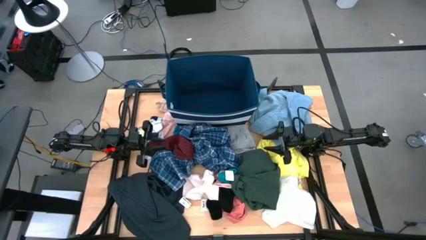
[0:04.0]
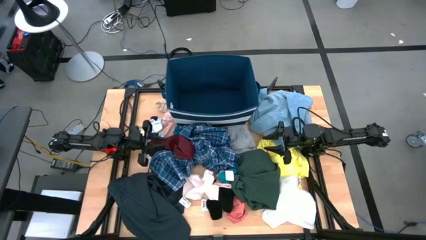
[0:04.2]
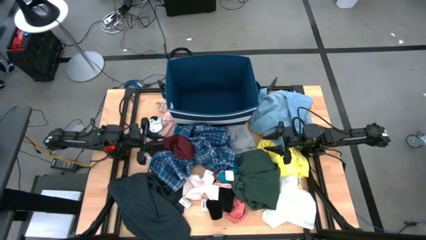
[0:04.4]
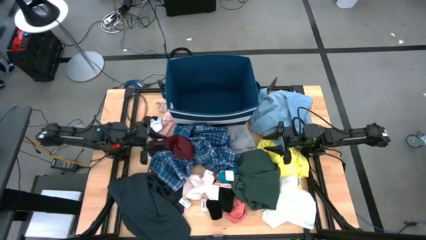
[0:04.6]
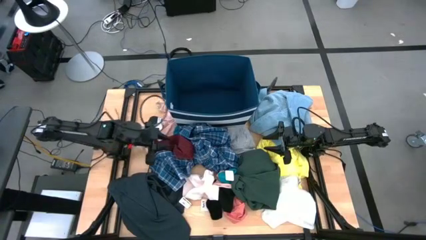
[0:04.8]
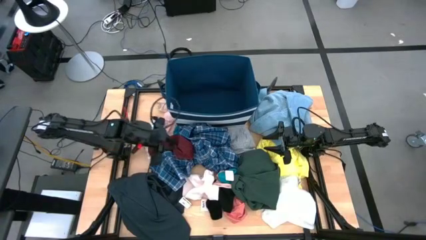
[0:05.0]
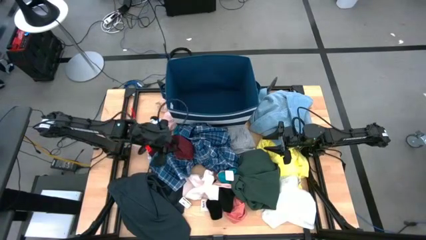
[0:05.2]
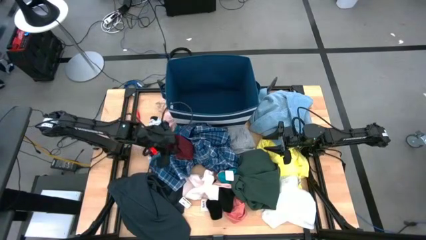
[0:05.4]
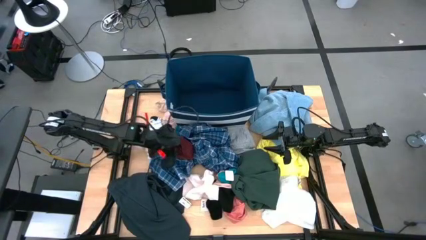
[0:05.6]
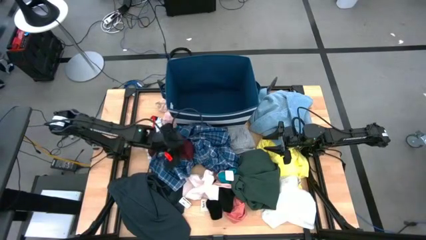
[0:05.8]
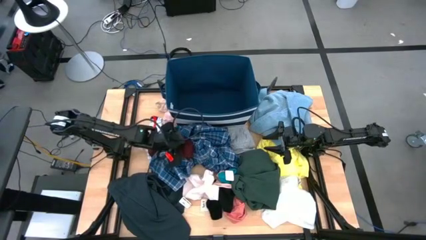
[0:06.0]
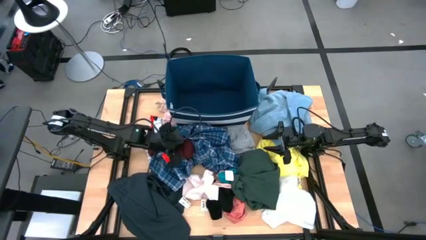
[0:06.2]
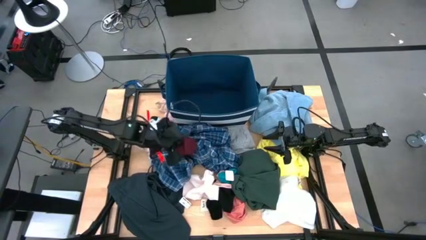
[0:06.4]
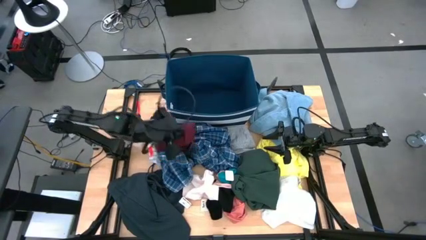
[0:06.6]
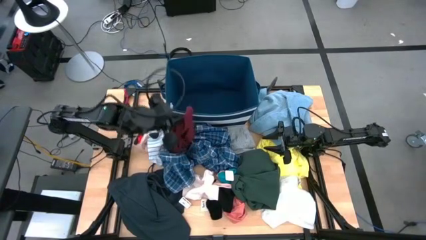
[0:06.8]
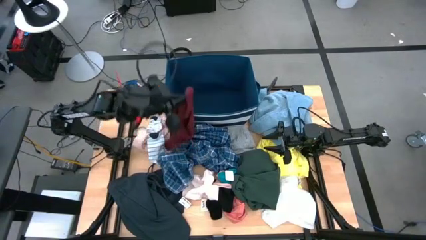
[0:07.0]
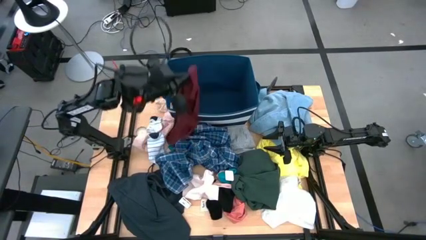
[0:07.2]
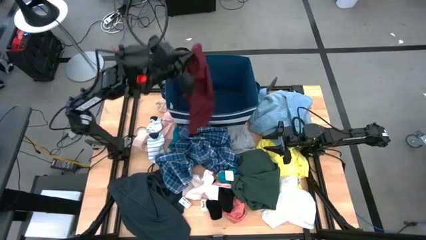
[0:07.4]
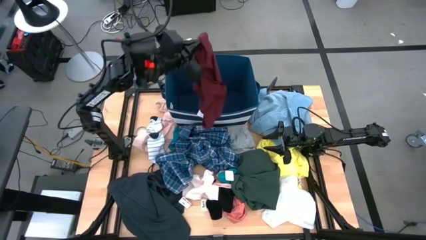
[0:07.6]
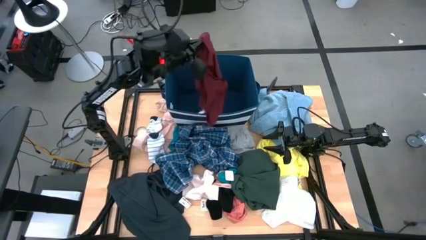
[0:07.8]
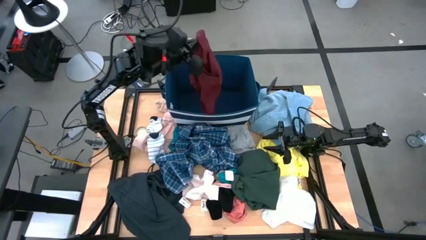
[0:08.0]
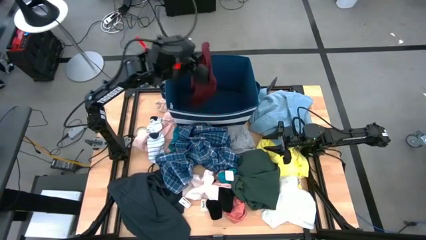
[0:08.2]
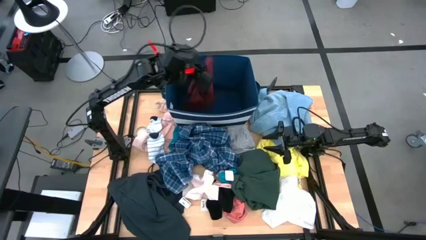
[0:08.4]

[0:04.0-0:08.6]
Task: Sort clothes
Put the brown underwear into the blue laundry organizer

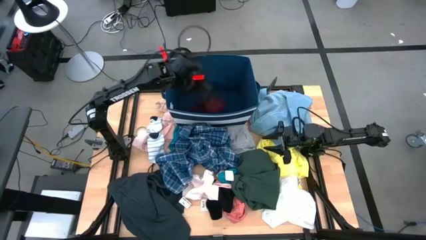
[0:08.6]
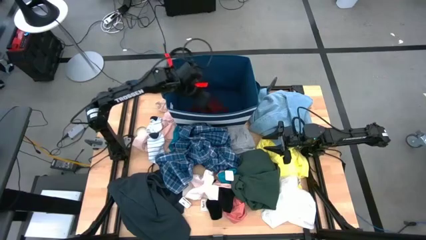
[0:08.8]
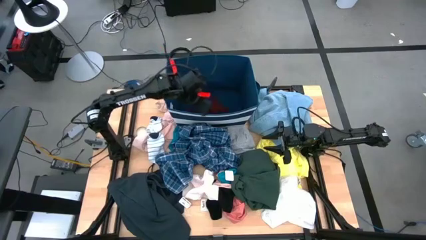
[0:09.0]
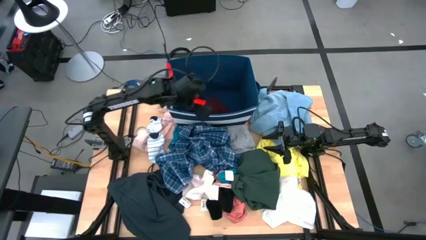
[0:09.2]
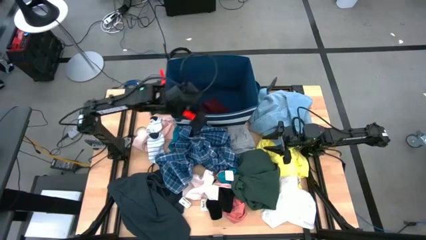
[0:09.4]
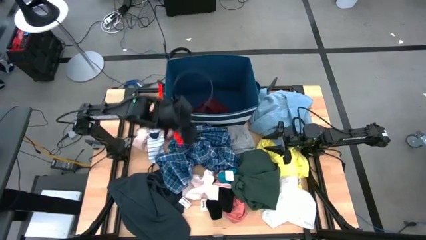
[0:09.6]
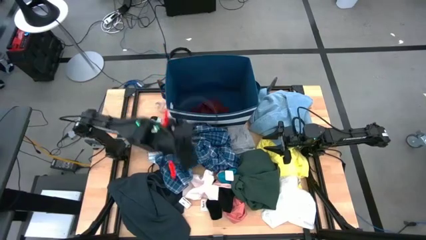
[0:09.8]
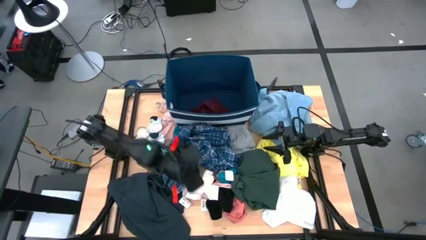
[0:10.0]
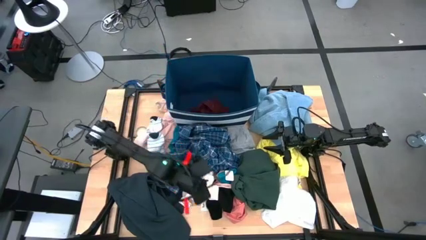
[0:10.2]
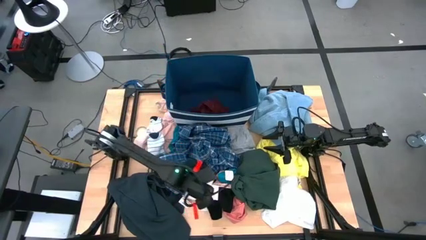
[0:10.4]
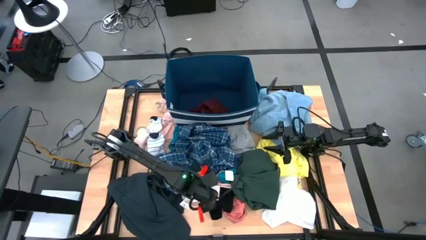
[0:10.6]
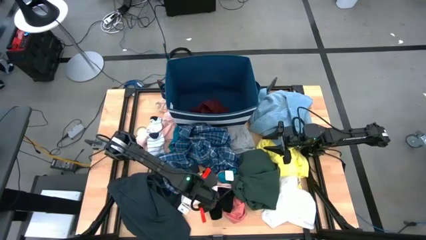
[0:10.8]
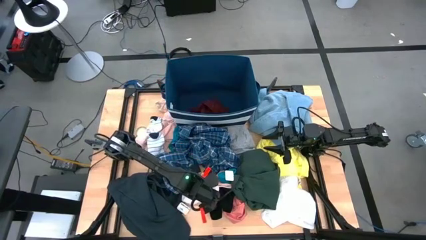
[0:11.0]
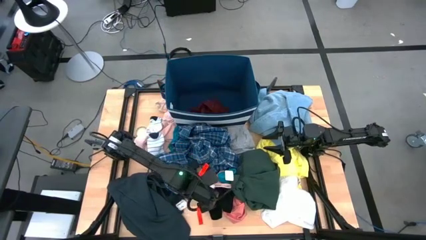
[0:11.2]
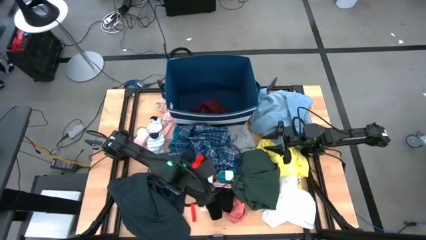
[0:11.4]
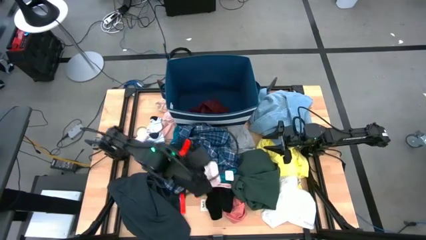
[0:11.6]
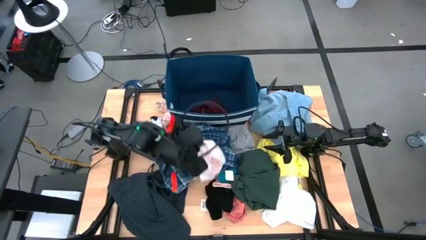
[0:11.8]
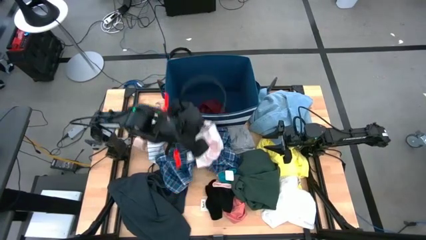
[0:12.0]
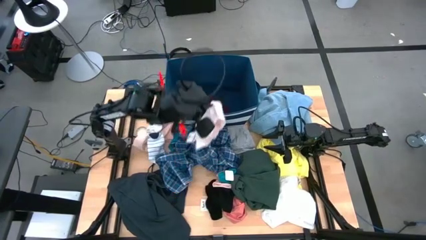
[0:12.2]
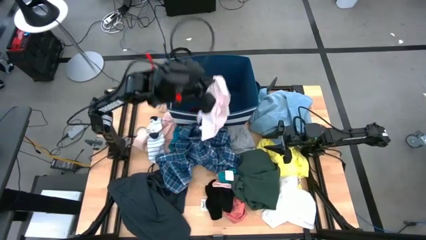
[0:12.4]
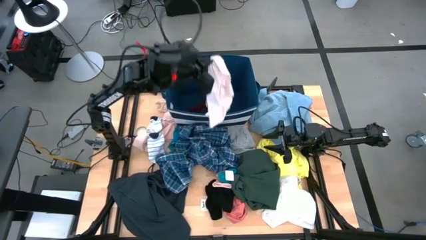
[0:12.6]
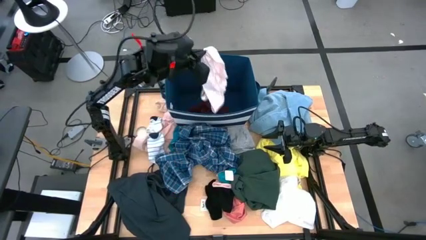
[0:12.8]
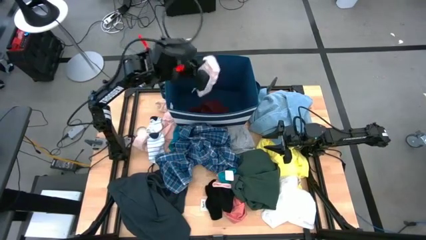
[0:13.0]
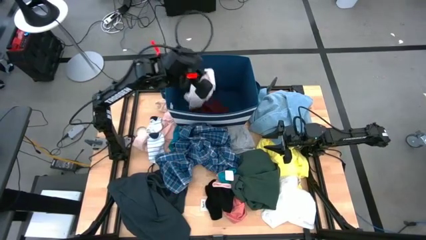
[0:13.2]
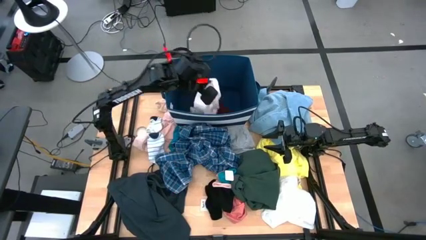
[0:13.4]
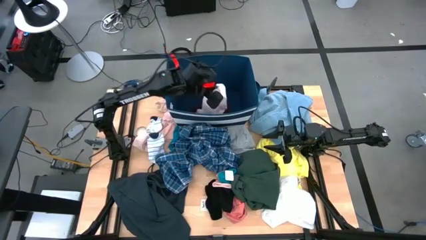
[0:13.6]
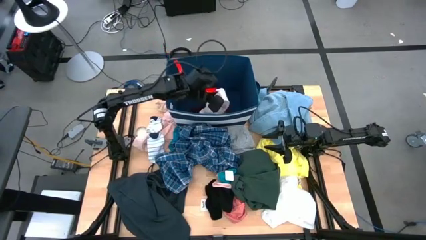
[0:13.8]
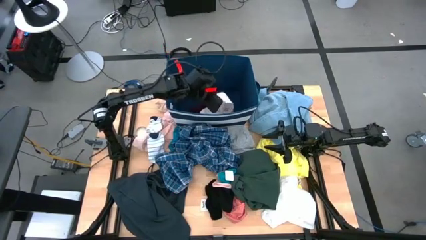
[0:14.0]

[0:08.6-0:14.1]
Put the white underwear into the blue laundry organizer

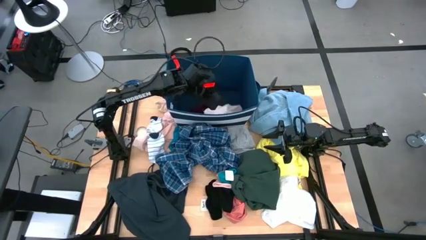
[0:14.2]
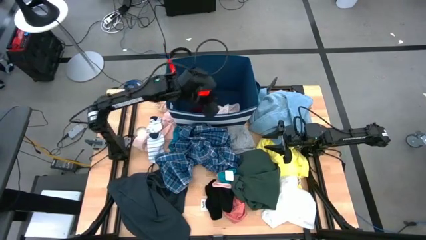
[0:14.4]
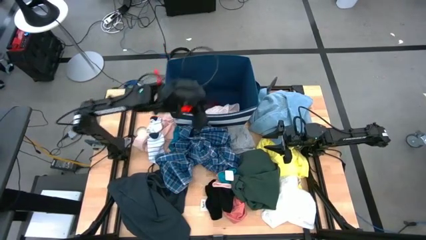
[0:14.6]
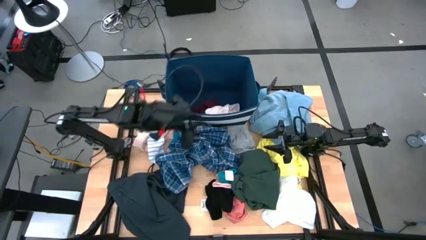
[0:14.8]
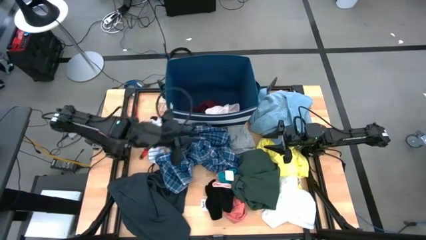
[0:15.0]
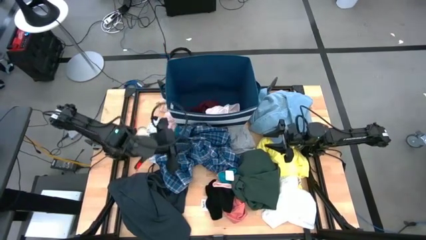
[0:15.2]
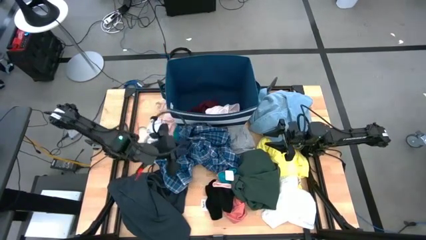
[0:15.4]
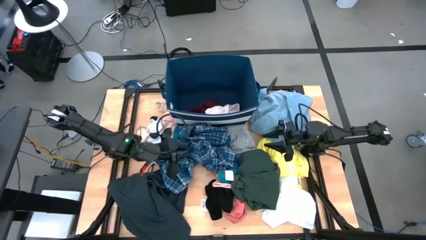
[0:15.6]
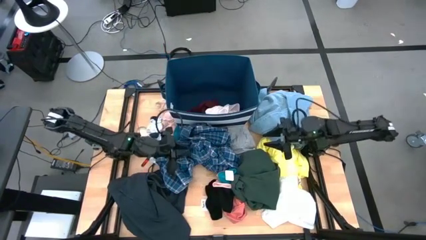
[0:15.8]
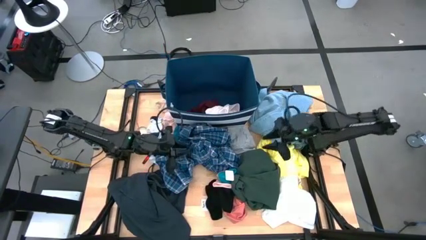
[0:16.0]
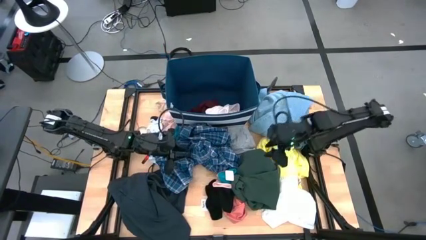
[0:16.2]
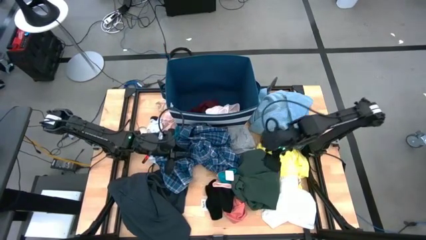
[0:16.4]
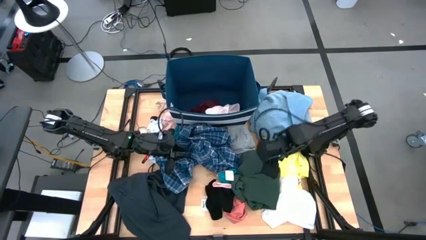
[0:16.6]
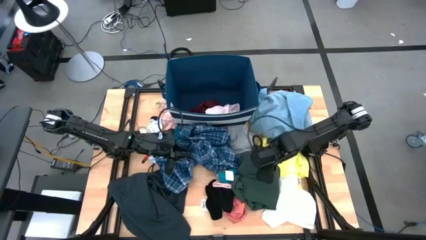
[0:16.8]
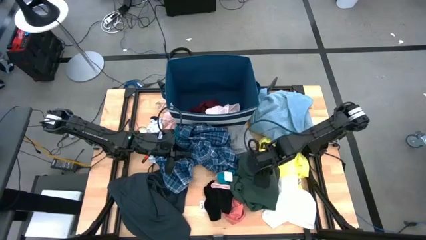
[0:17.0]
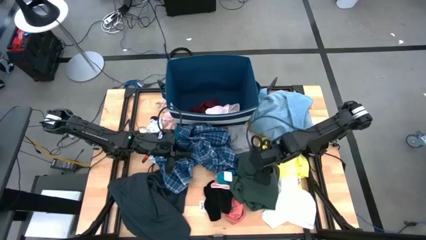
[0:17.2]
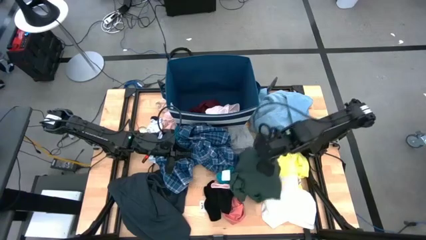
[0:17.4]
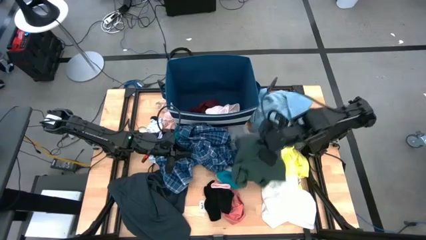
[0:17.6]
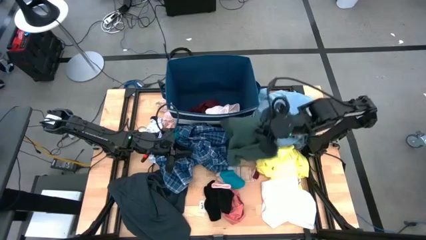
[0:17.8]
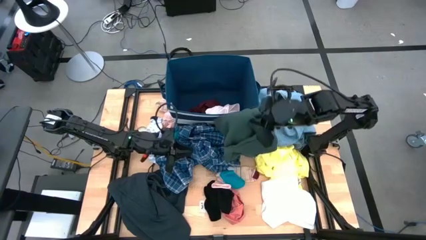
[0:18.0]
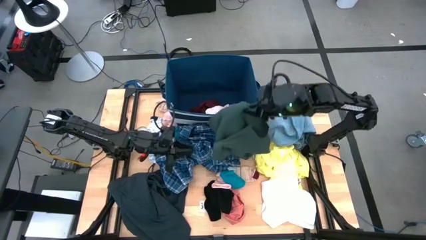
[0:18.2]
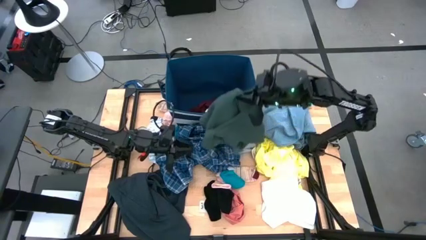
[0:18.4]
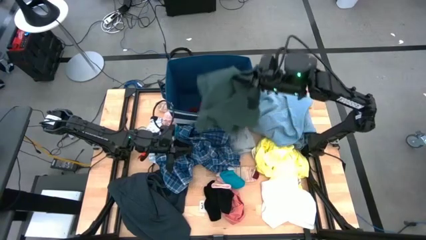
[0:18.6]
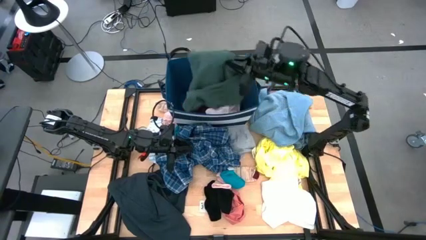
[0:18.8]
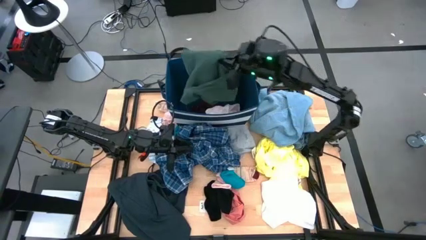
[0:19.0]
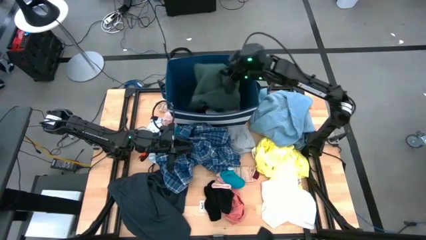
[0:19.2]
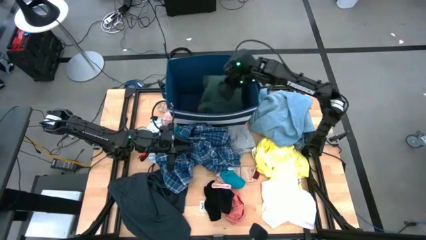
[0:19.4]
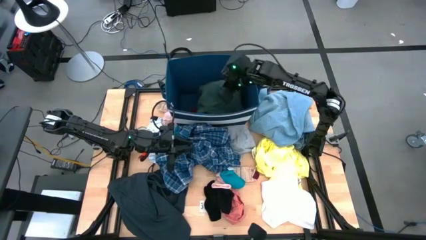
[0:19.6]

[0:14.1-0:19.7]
Put the green shirt into the blue laundry organizer
